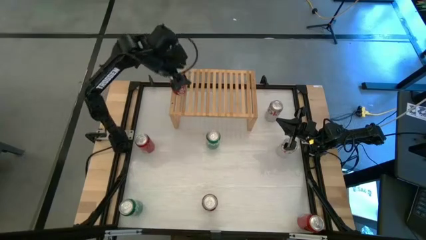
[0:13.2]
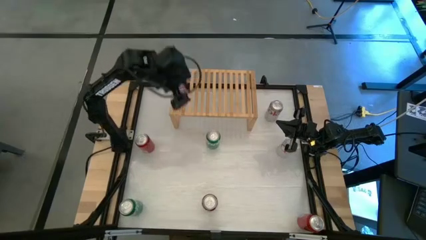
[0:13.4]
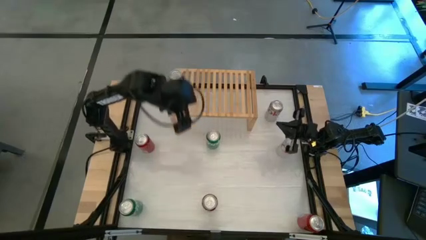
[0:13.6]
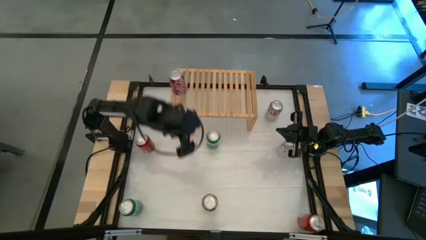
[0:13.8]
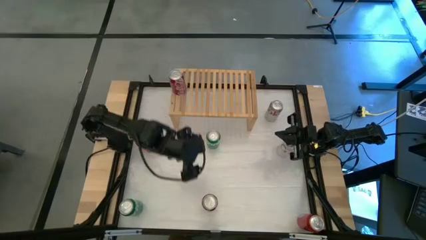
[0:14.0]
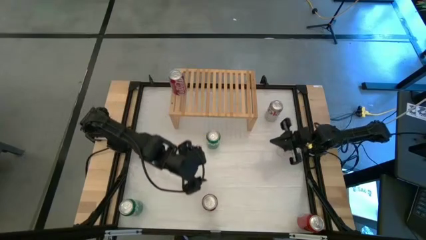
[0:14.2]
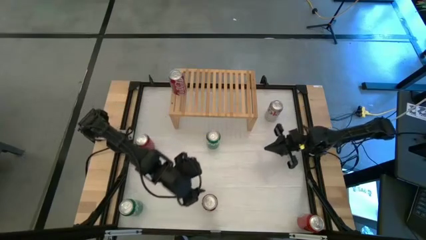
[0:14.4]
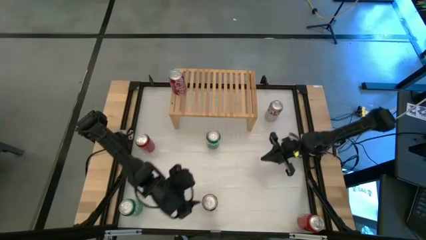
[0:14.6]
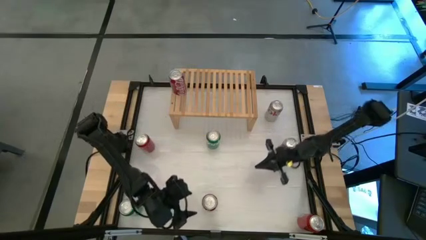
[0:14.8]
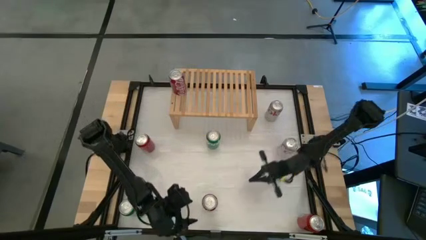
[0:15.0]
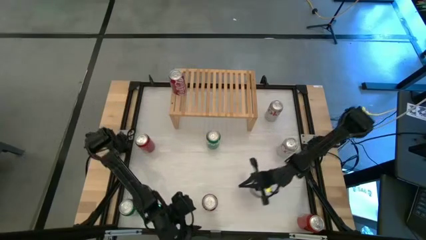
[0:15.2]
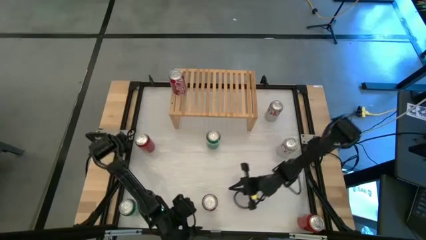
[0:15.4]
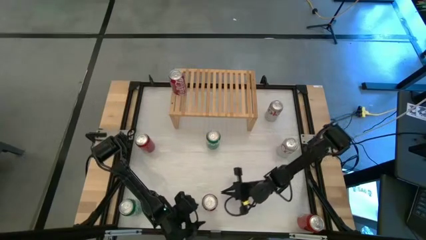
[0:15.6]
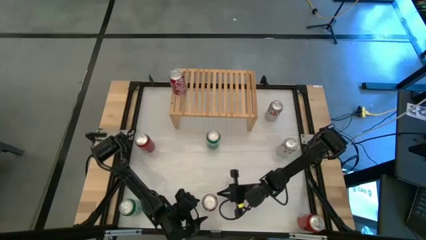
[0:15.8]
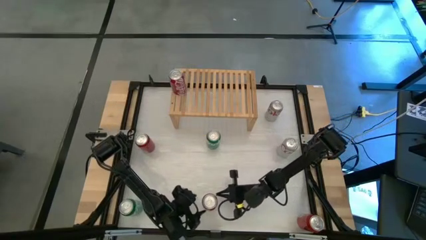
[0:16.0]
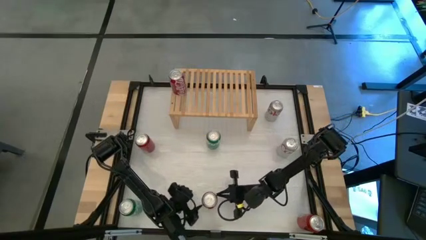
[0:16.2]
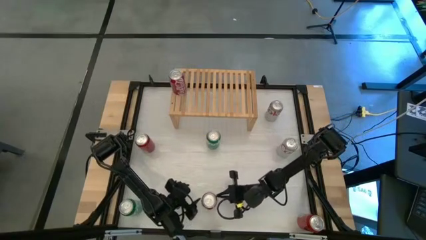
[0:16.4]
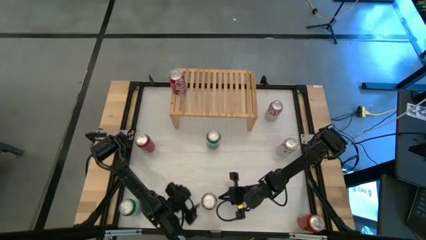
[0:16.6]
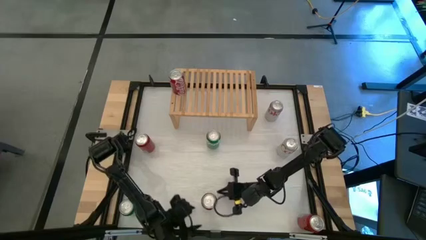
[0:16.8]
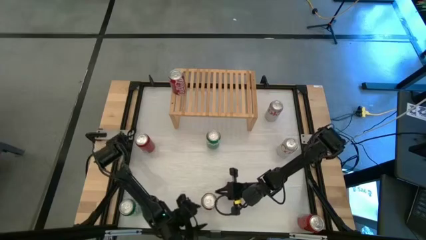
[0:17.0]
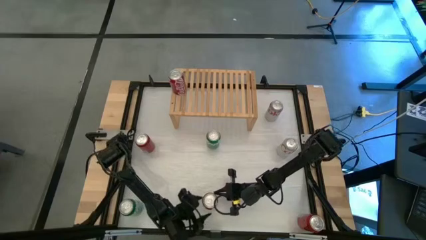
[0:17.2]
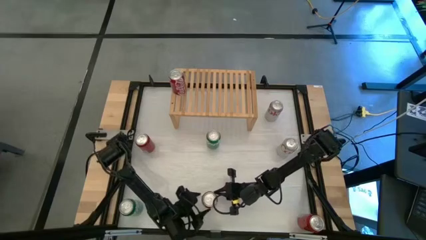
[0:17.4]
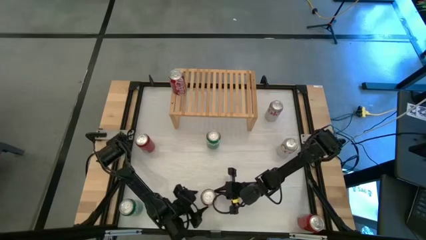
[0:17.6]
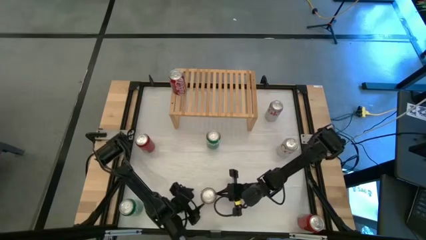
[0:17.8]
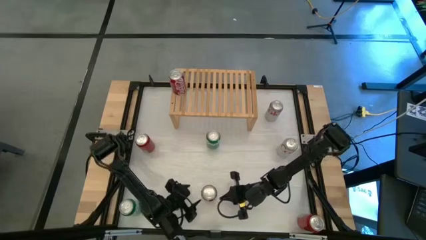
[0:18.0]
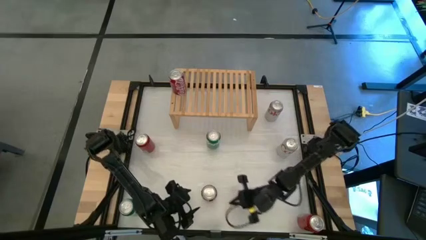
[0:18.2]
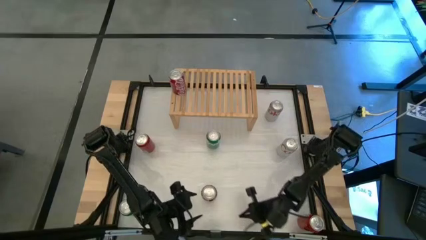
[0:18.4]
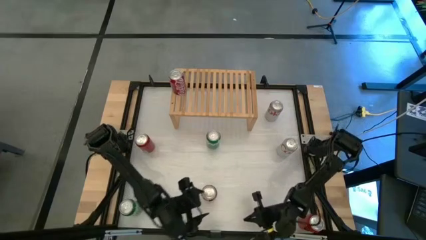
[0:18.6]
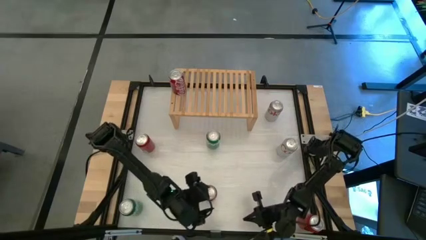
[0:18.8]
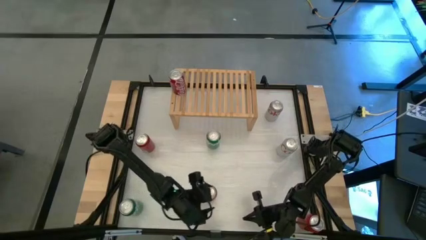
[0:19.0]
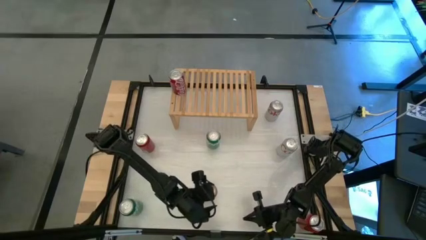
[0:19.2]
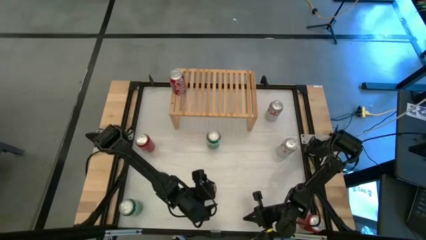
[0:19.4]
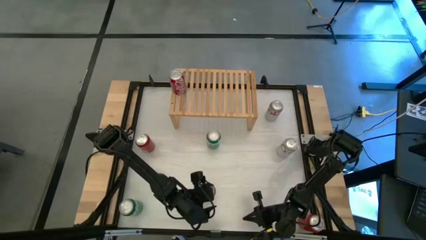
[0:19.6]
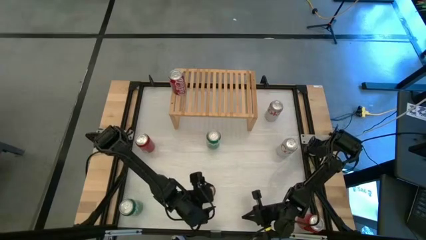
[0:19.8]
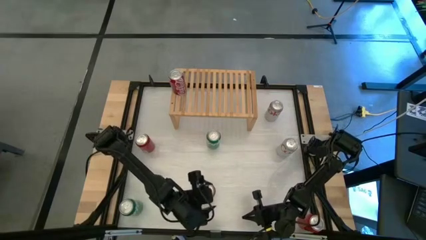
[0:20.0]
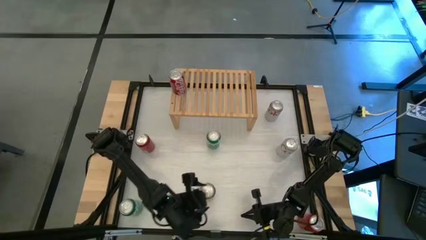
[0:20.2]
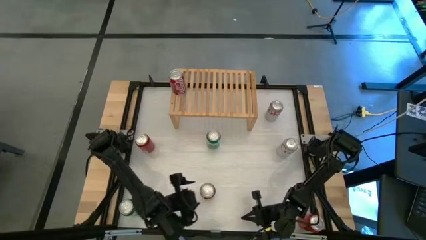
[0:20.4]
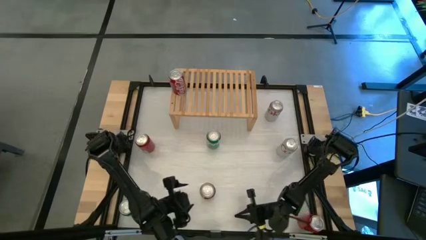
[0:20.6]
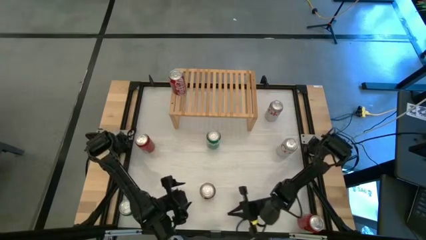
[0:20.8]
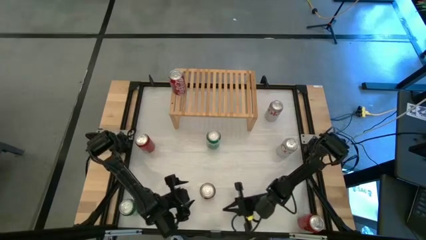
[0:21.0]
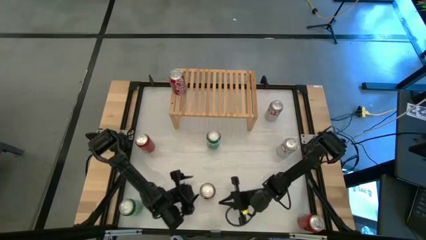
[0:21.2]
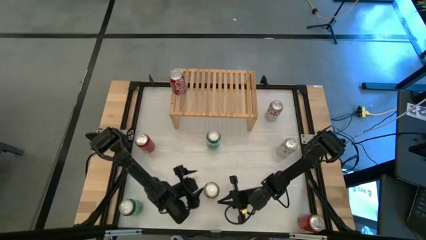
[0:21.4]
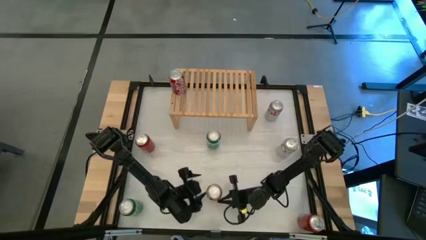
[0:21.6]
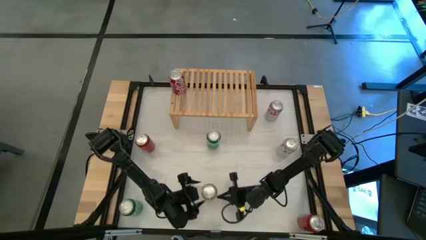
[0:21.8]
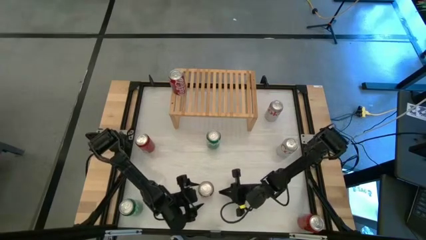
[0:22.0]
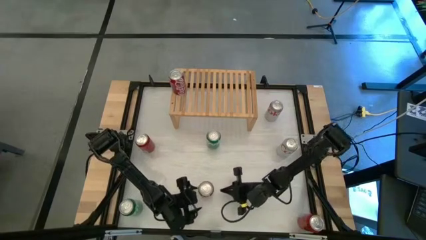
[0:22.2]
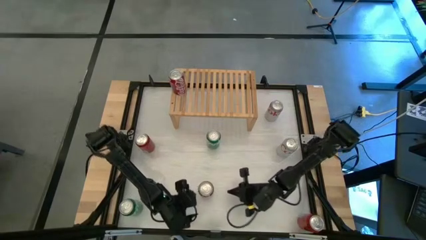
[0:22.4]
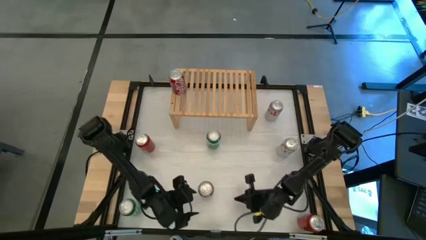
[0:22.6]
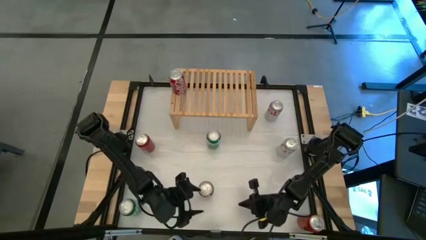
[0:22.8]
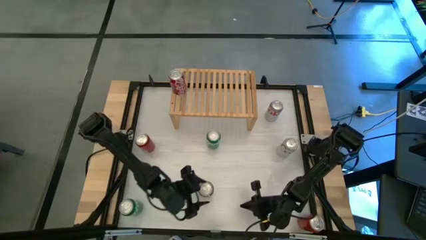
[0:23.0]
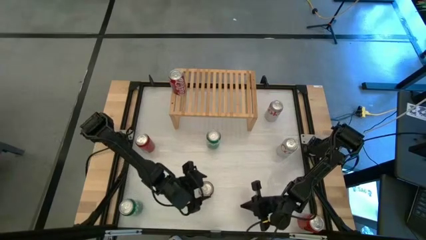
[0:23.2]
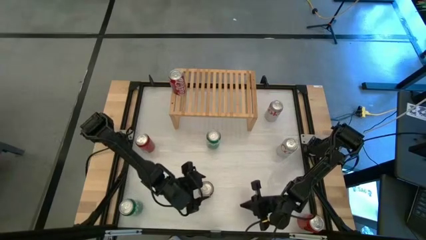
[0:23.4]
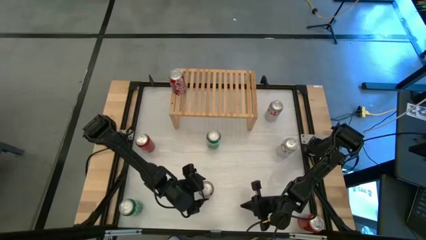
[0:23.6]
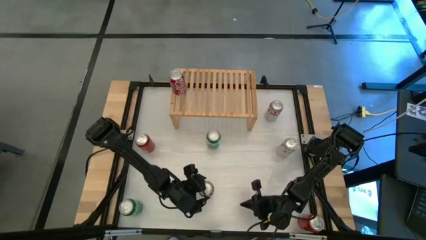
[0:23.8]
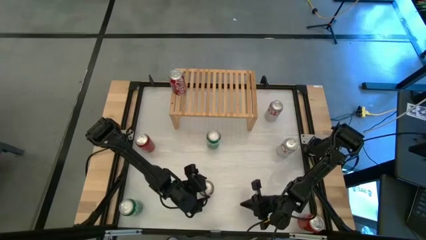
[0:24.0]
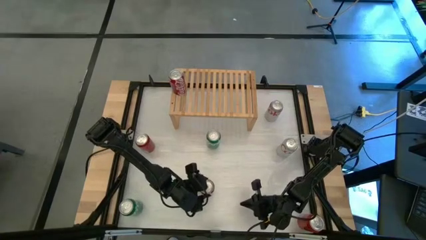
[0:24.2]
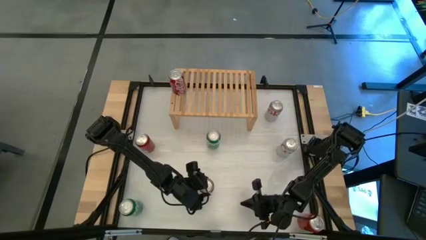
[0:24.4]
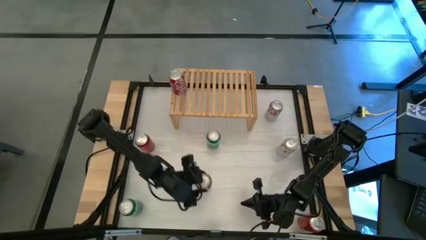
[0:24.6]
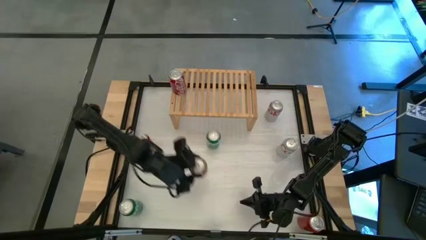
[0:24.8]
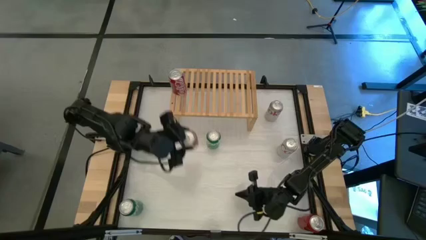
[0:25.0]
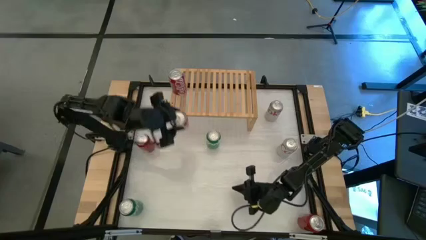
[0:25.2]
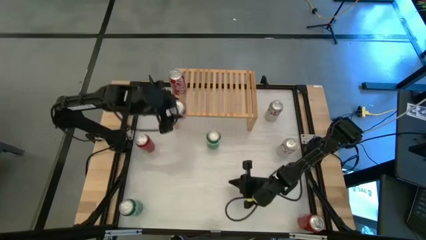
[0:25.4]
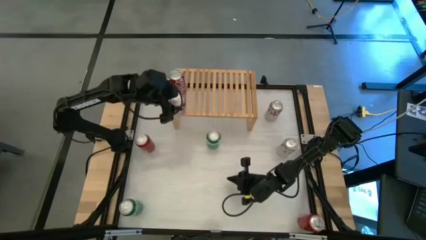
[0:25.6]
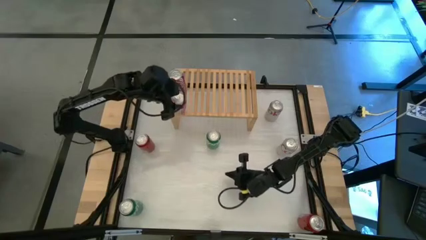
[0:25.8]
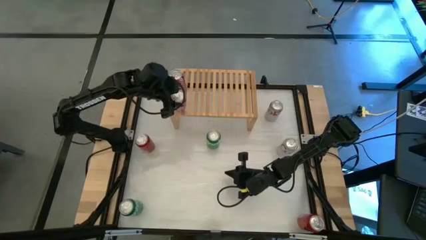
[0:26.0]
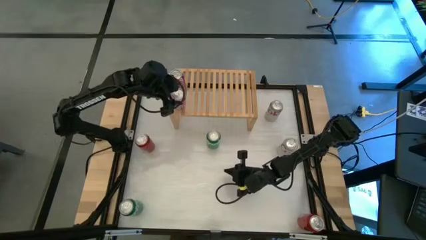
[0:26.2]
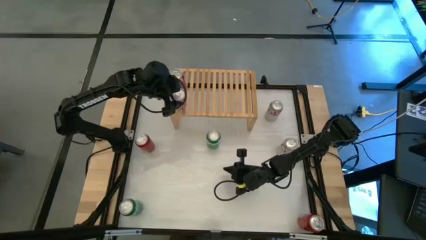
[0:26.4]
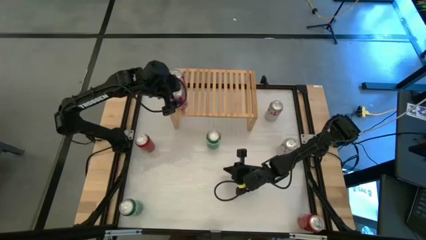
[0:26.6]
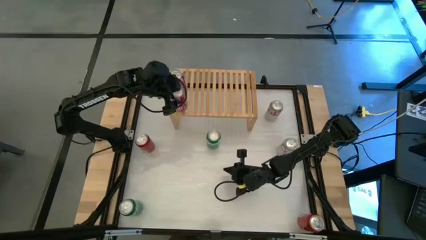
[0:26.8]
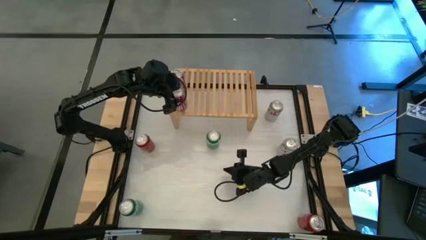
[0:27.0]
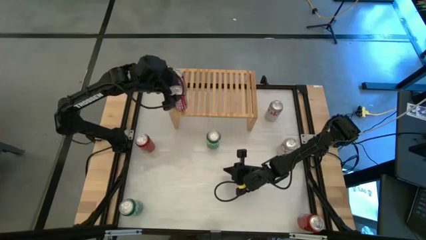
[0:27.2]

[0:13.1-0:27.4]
Task: Place canned beverage on shelf
Put the red white soda can on the shelf aligned with the other red white soda can
